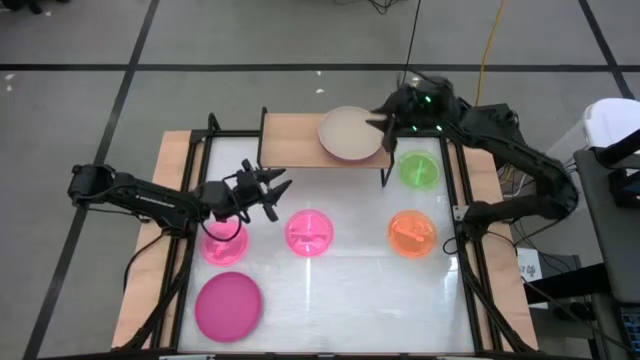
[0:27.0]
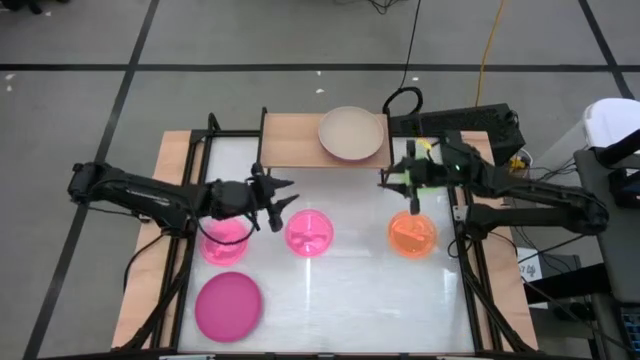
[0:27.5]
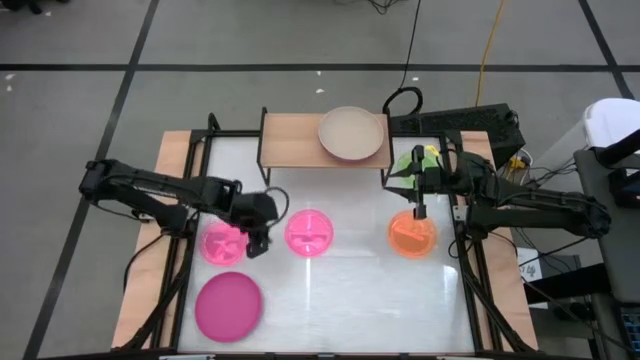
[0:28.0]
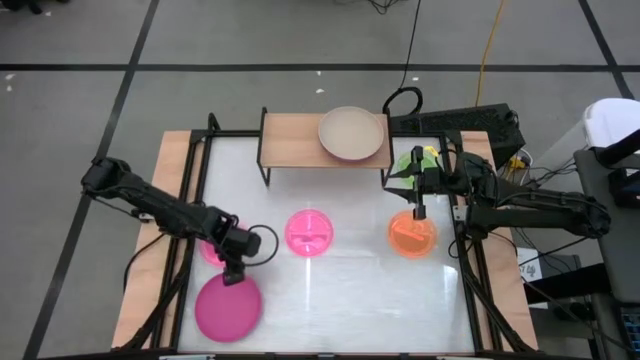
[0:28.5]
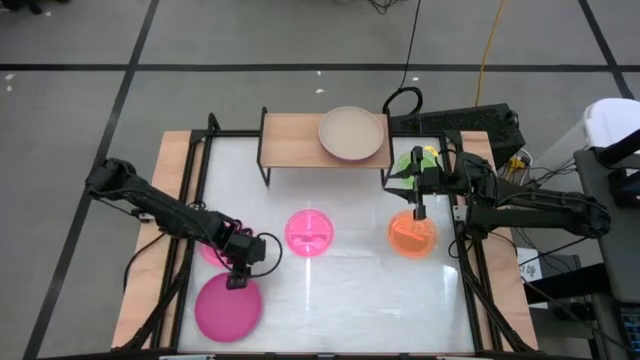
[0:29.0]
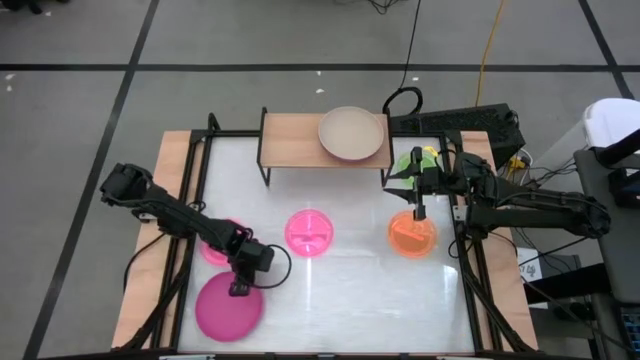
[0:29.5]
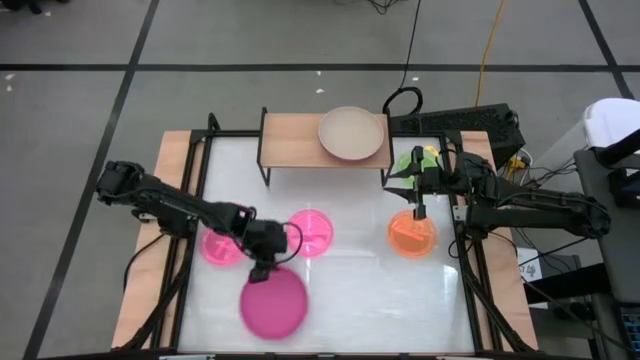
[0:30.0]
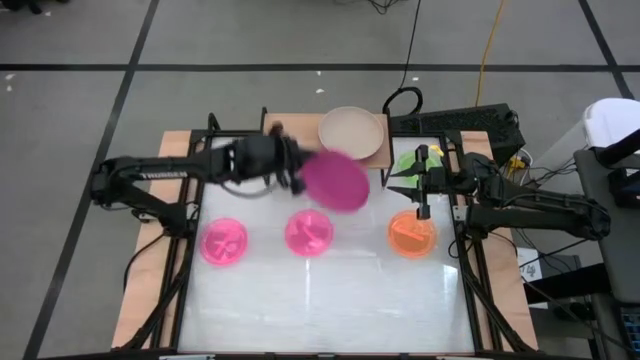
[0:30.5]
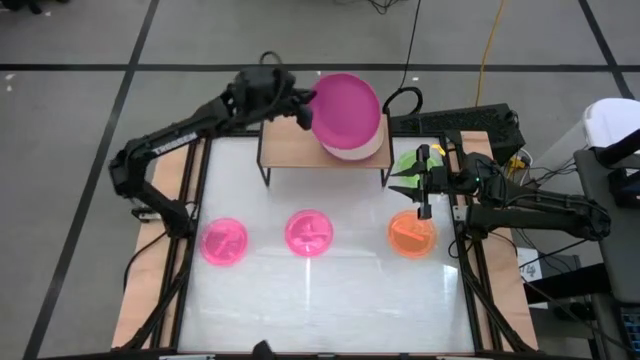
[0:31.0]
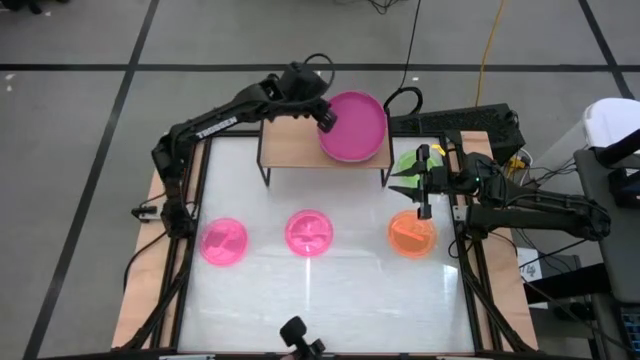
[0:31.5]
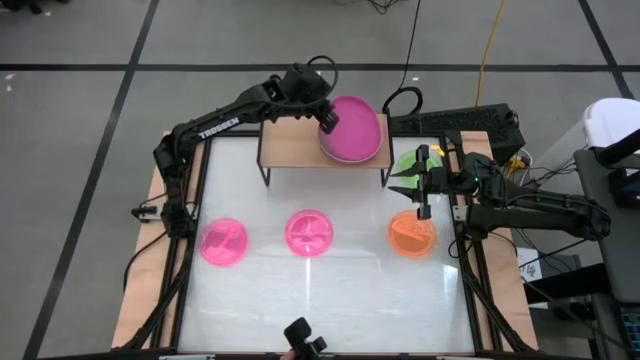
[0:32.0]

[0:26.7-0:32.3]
Task: Place and stack plates onto a shelf
Stack the pink plate on top of the light brown plate on the shelf

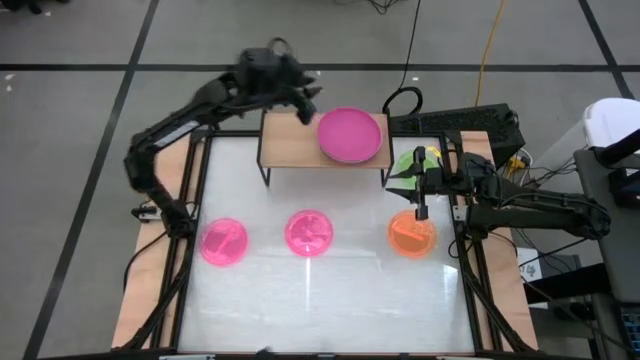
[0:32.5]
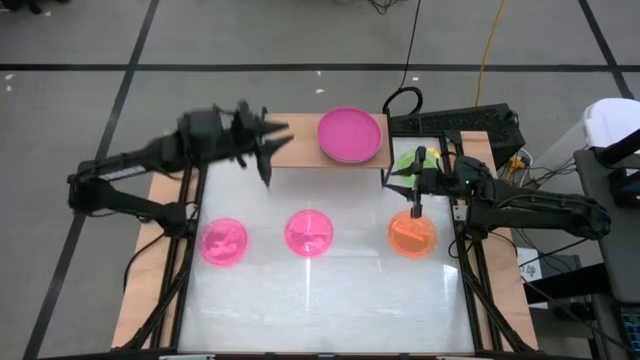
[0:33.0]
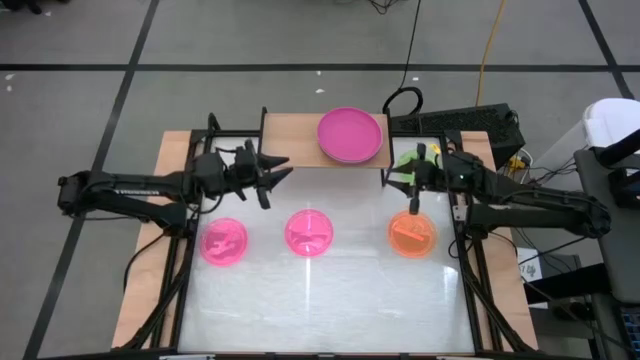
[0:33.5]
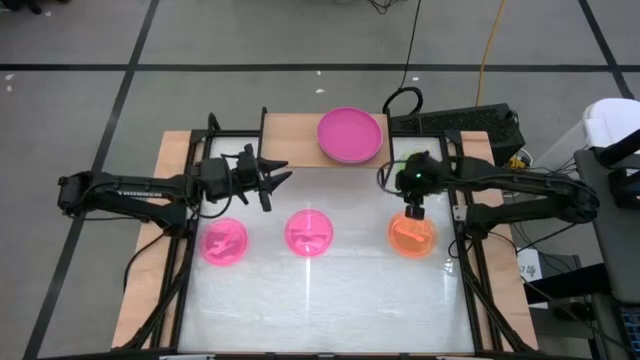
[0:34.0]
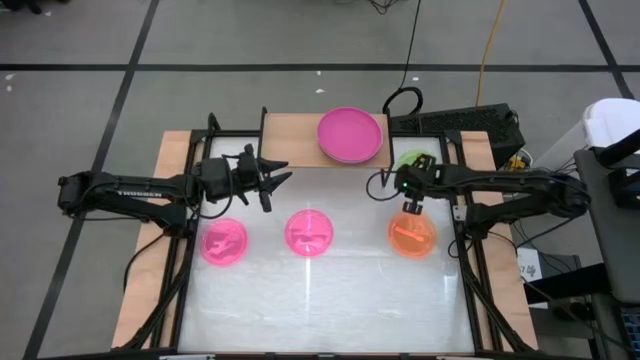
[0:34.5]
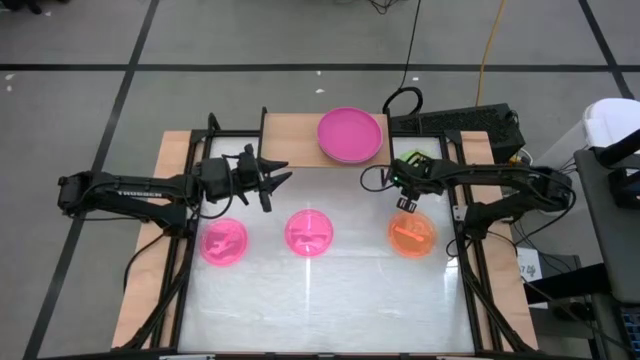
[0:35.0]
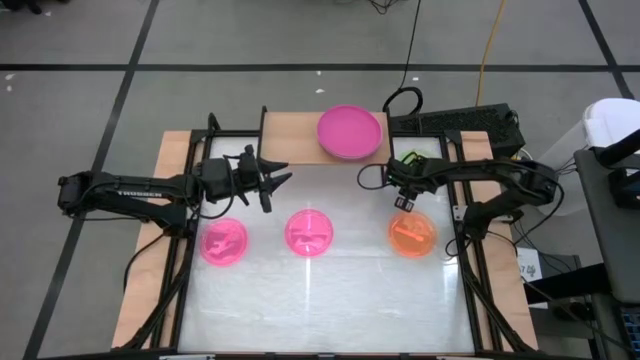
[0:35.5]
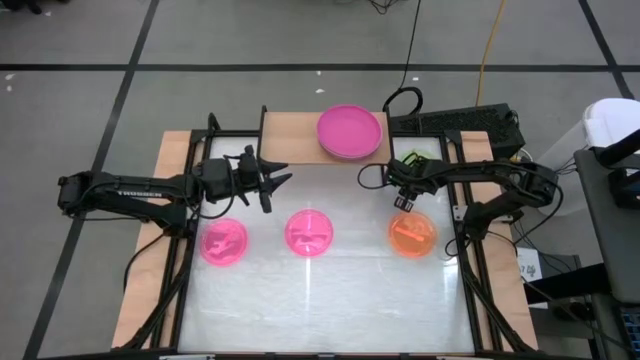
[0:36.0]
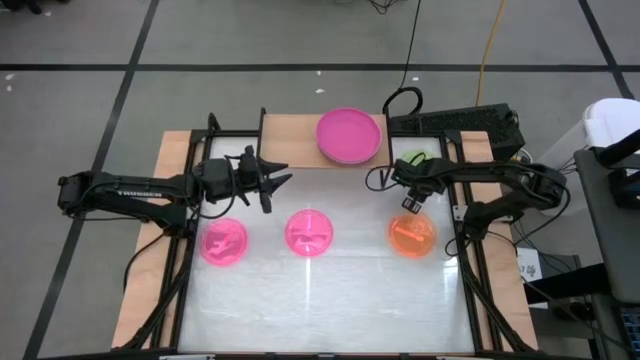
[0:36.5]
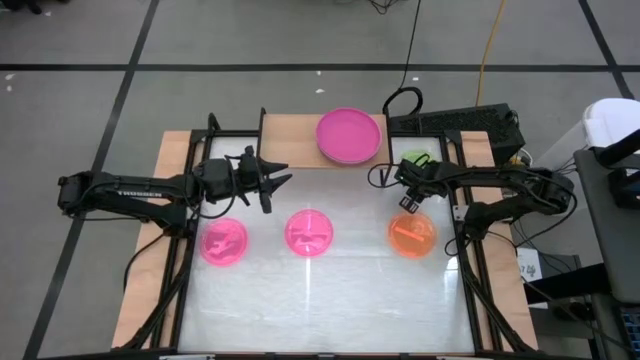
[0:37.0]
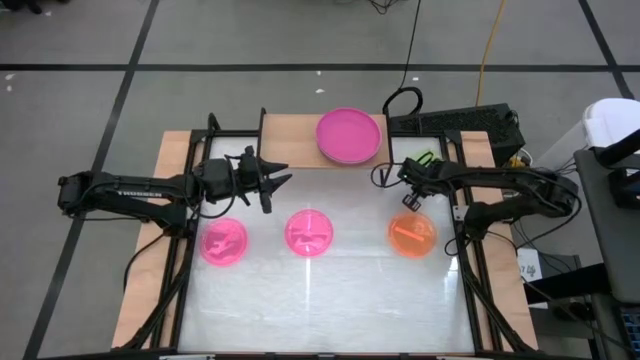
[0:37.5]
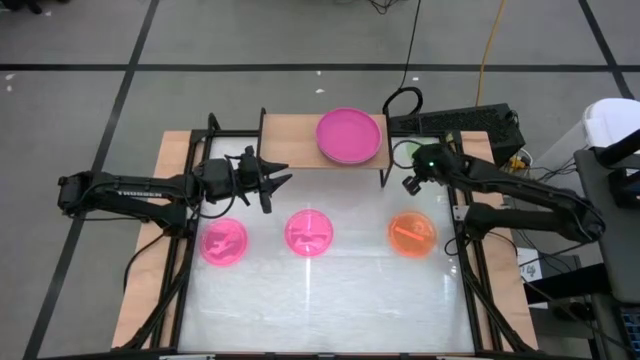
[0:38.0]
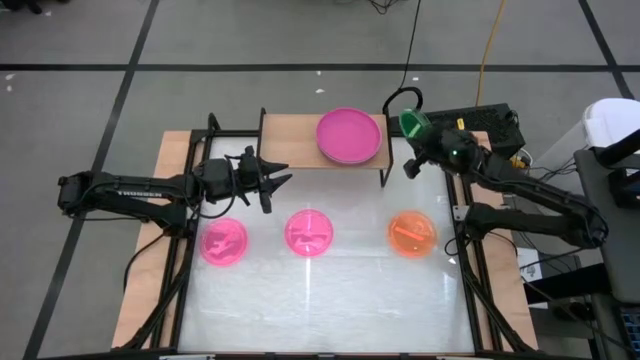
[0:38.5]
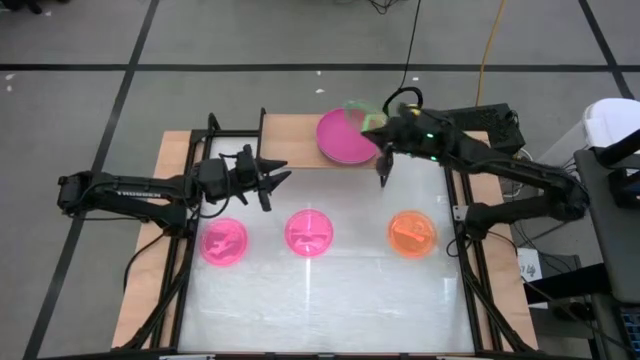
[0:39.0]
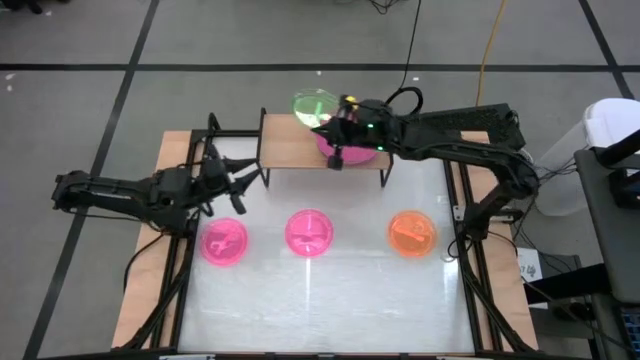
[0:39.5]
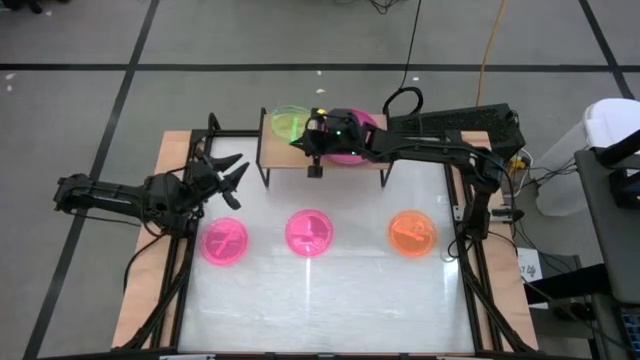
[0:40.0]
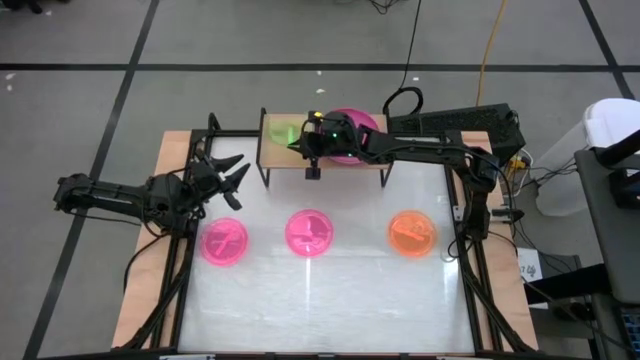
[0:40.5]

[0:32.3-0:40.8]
Put the green transparent plate on the shelf

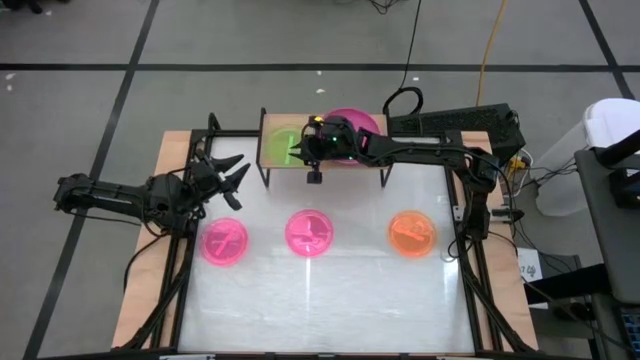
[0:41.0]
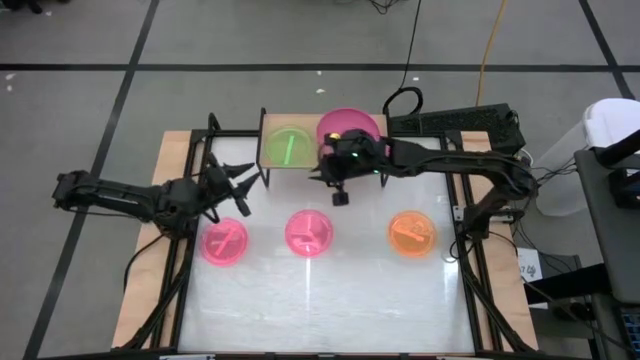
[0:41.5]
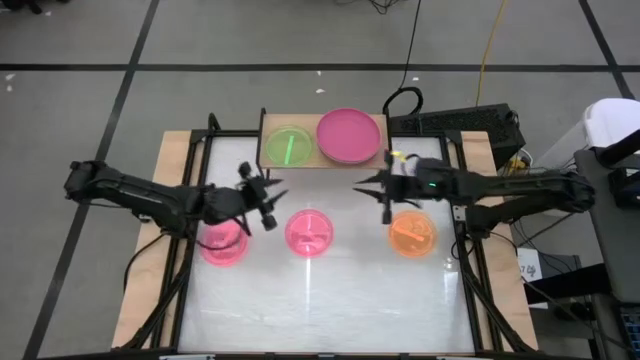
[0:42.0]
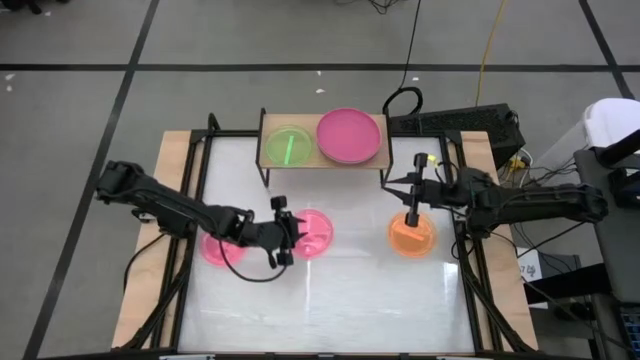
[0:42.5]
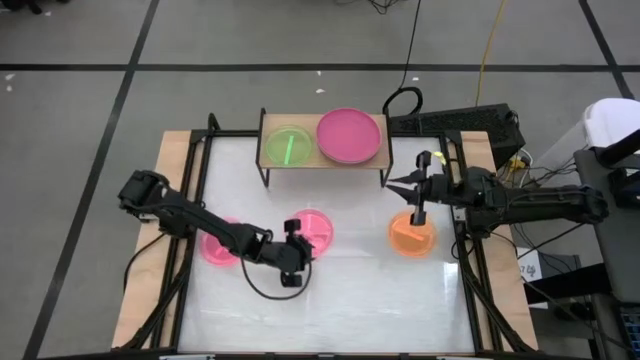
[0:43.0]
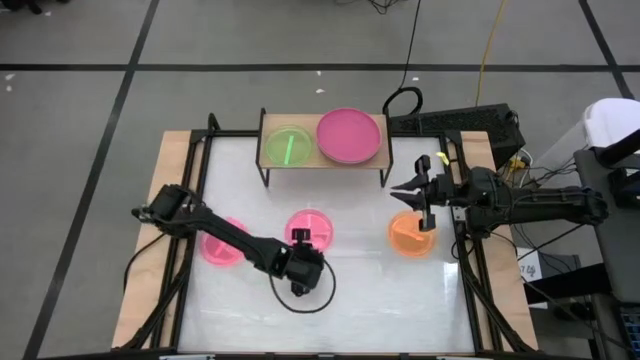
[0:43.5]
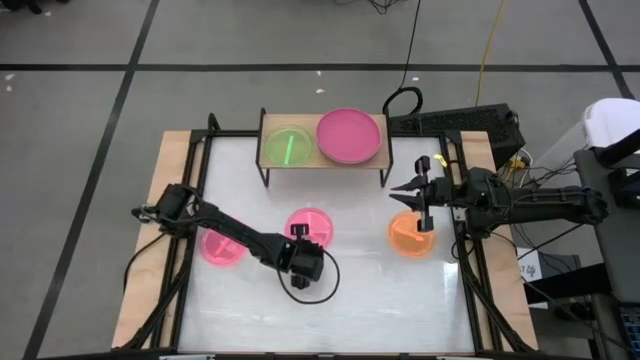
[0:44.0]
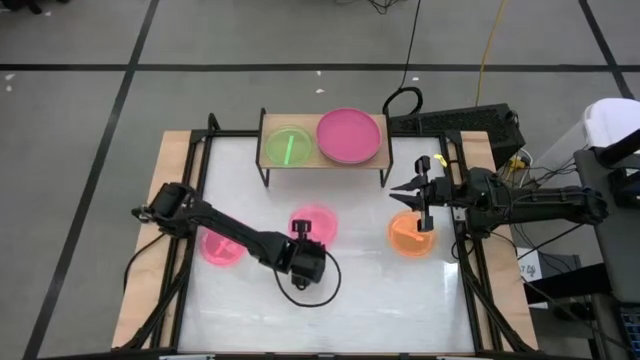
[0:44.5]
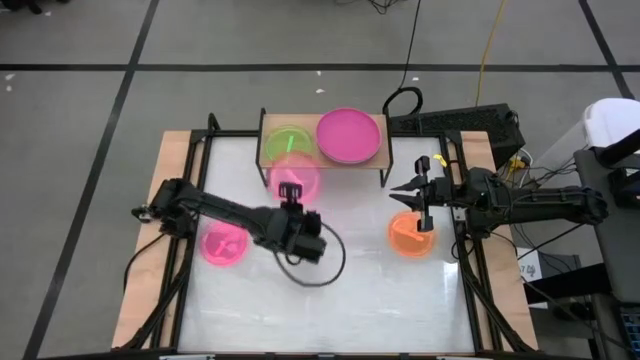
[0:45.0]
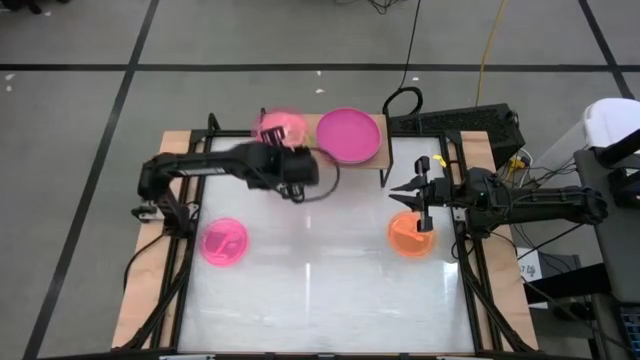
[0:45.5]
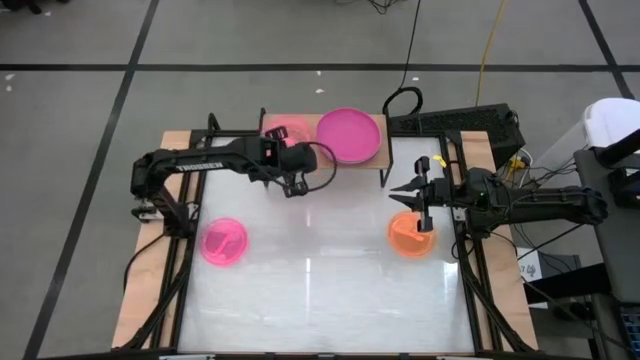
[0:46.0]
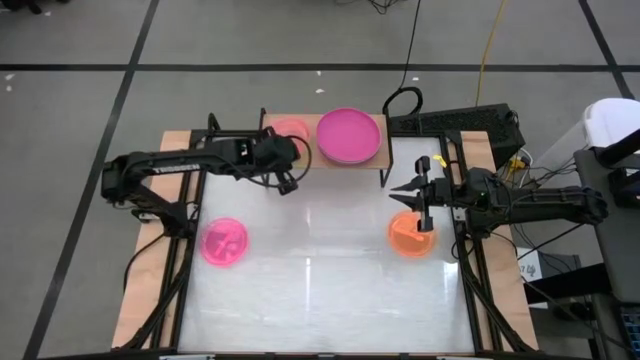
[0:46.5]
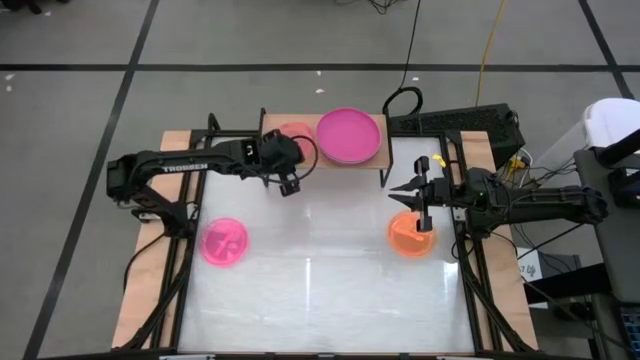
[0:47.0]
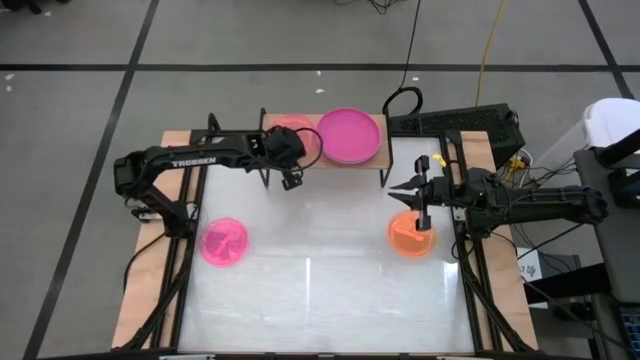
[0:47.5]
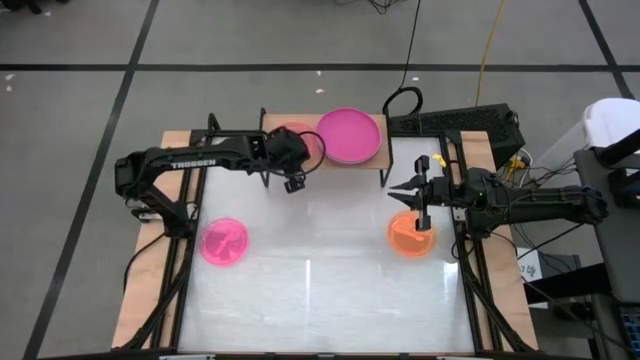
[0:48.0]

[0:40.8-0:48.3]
Stack the pink transparent plate on top of the green transparent plate on the shelf

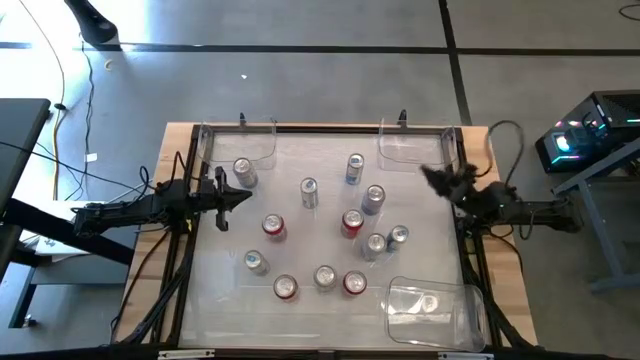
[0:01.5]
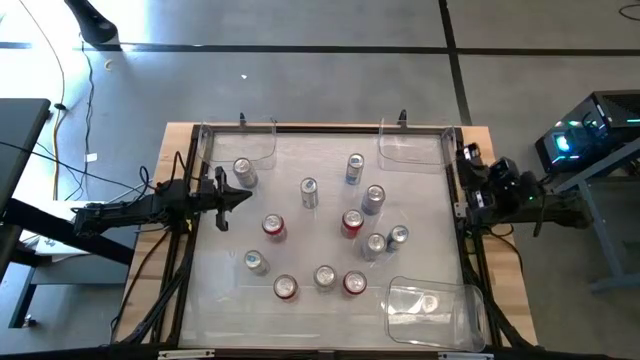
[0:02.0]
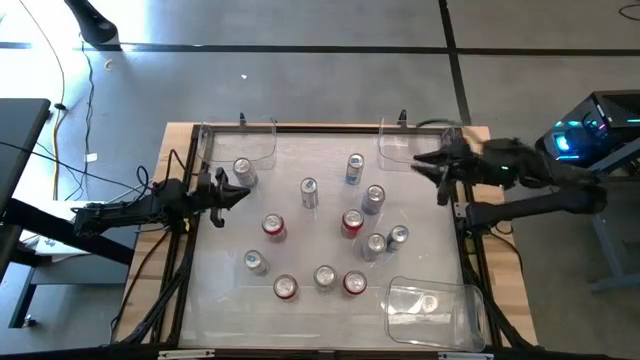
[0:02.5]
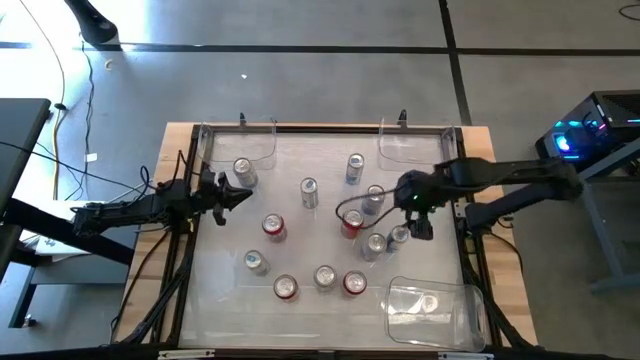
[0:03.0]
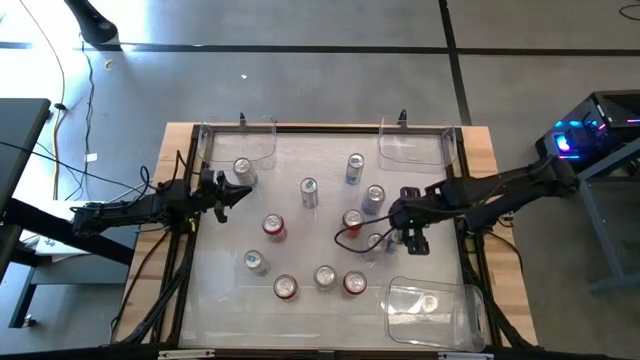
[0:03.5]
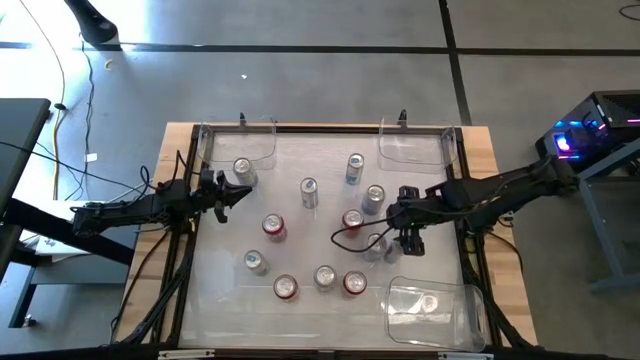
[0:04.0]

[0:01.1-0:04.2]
Task: Sort soda cans
Put the blue soda can into the bottom transparent bin
